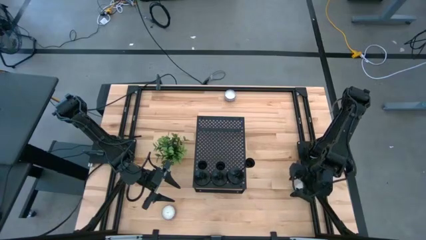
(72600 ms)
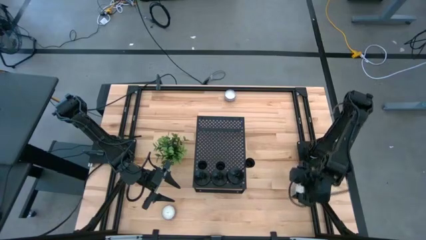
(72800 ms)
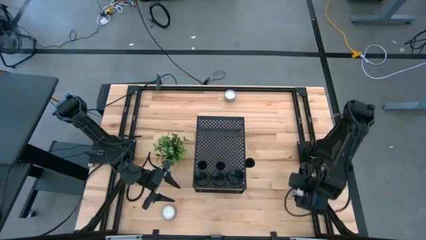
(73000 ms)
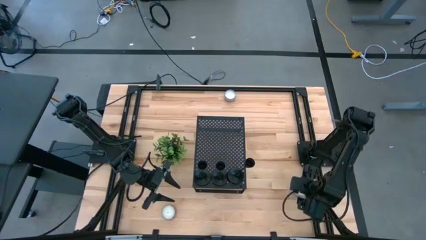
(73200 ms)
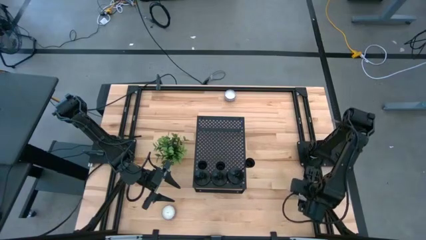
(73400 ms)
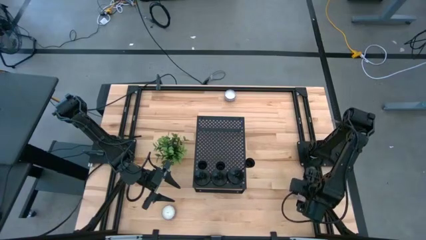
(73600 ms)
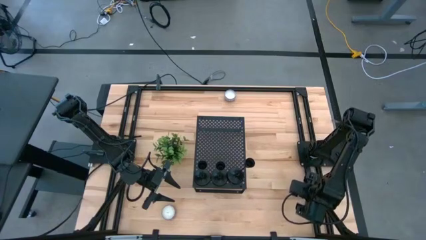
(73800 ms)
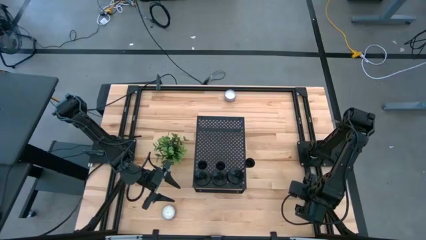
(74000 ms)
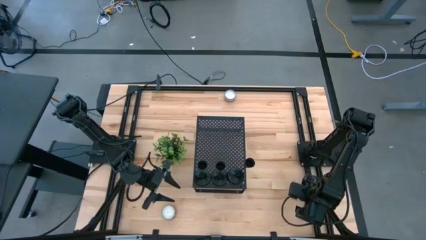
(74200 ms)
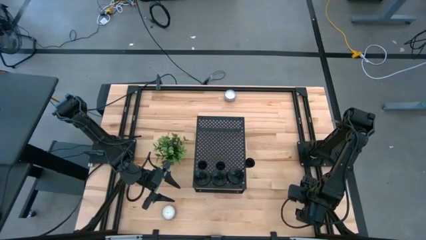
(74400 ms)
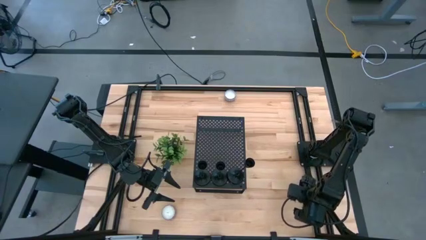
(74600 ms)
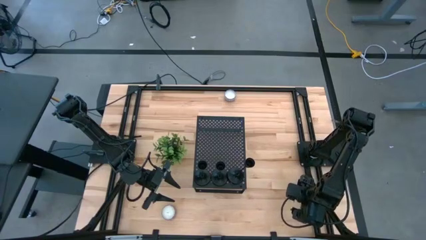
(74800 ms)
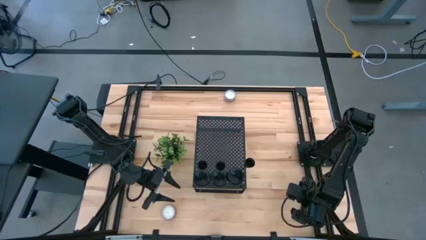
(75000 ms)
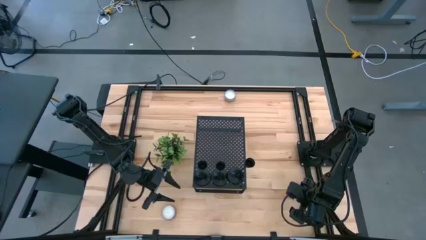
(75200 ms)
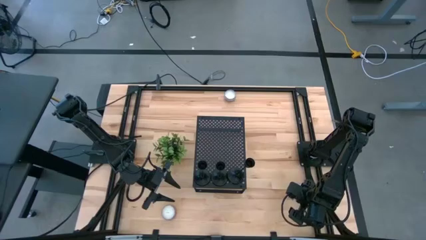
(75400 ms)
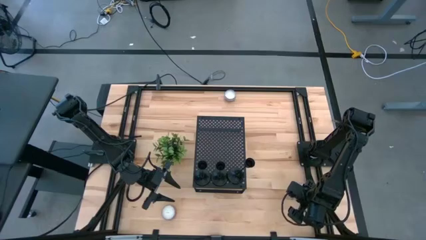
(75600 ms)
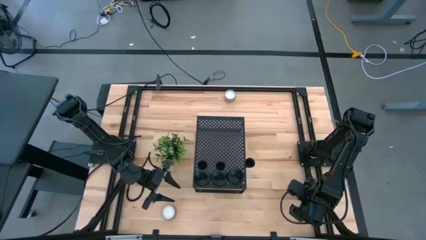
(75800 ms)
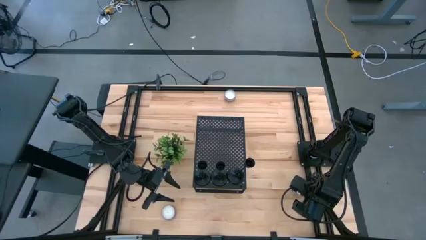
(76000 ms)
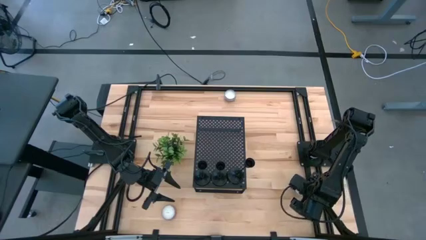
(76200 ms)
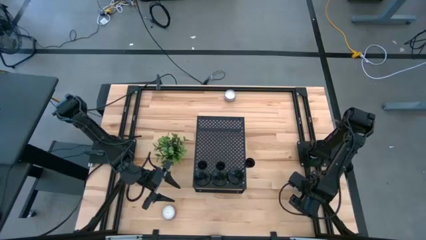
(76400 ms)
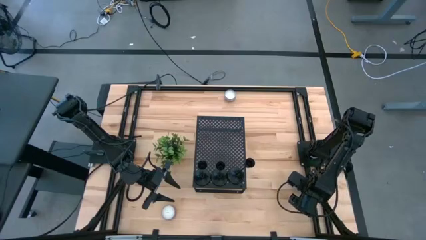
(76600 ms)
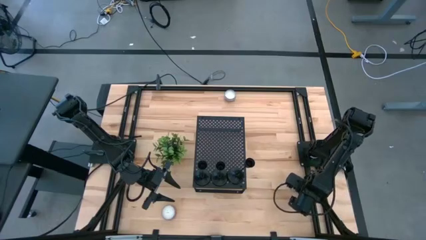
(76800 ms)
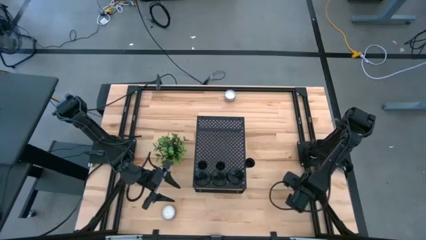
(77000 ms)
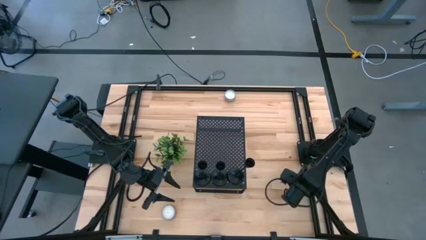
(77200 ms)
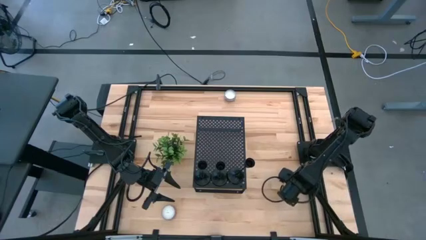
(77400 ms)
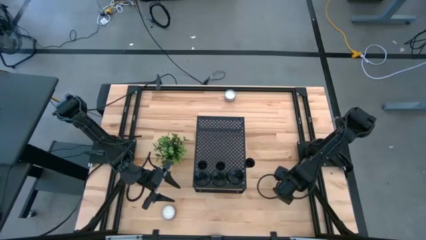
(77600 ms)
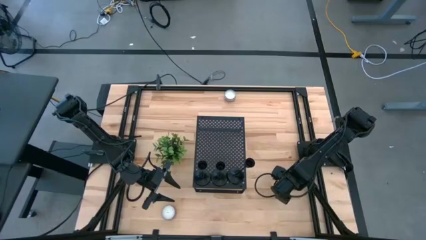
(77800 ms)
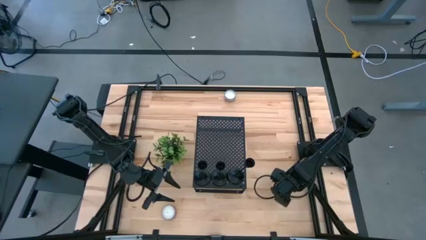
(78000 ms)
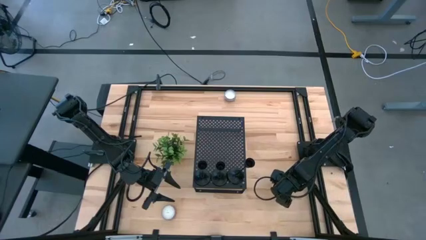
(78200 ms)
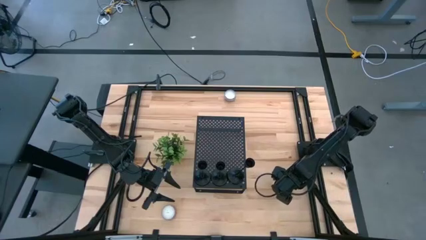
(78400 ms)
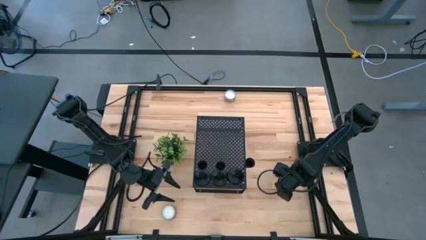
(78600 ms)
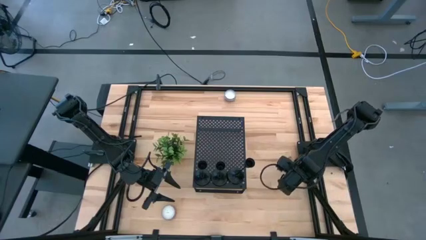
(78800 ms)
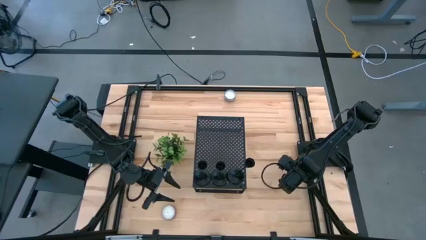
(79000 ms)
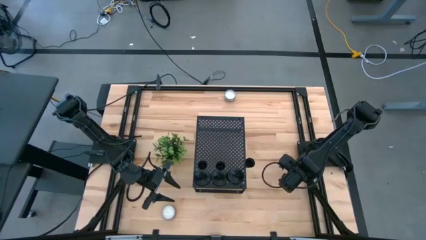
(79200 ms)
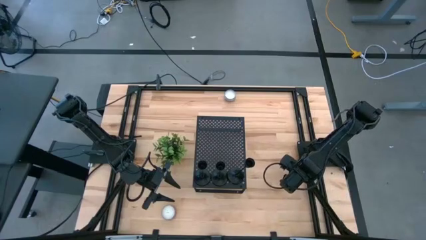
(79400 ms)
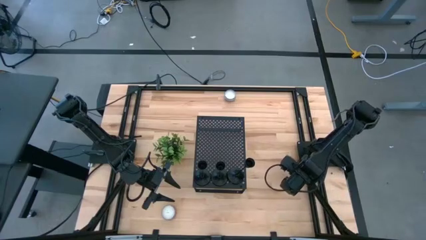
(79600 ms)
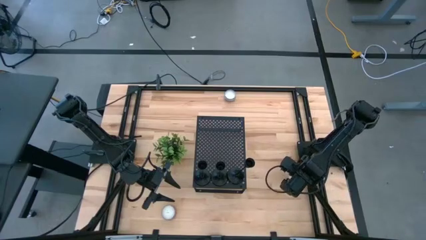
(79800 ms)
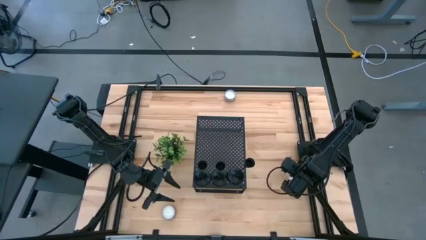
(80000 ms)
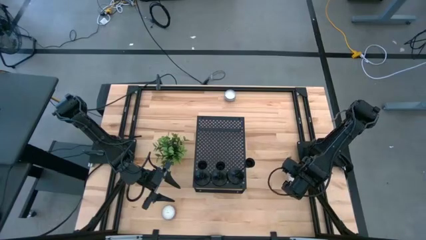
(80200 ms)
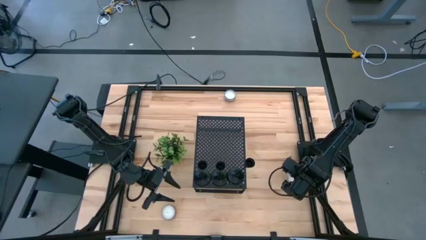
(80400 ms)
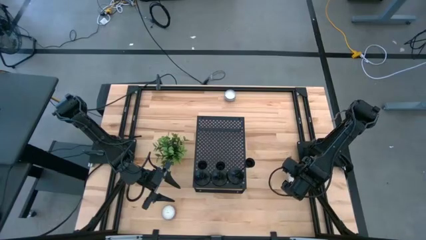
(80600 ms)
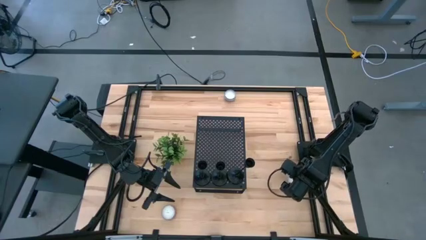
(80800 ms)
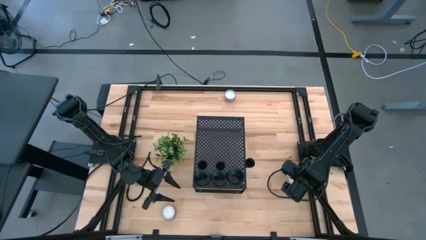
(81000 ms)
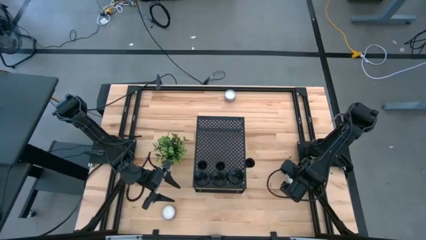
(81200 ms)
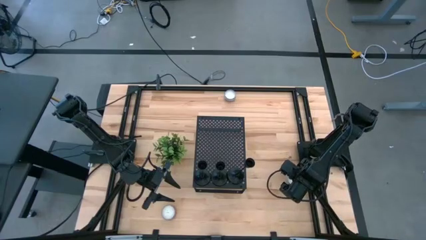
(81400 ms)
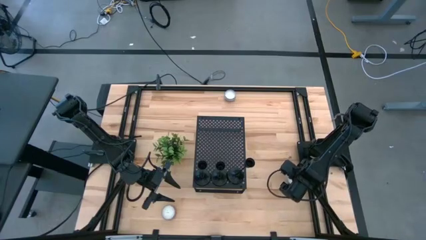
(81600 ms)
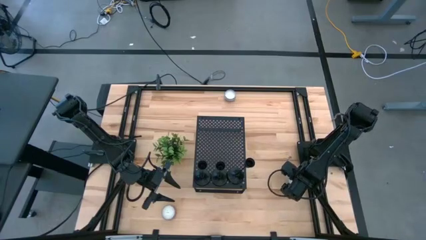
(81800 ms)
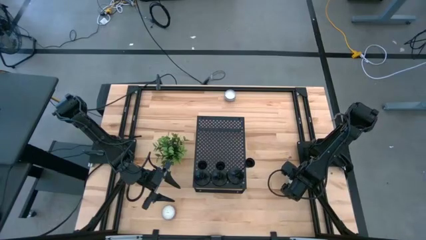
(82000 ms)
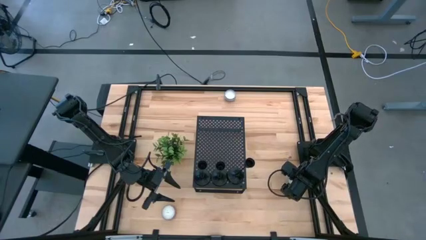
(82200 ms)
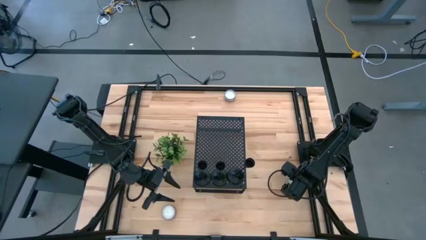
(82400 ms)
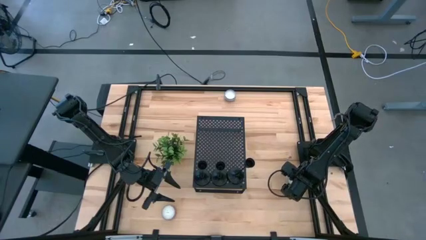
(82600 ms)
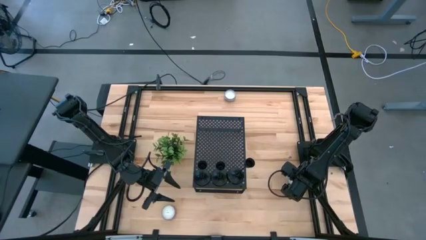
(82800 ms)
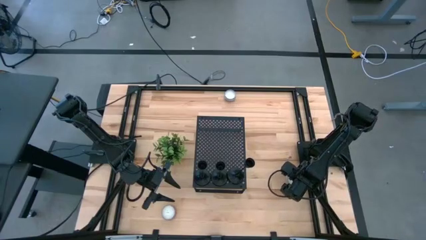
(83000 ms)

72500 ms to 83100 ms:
Task: Pick & Place candle stick holders
Put the blue patterned candle on the shelf

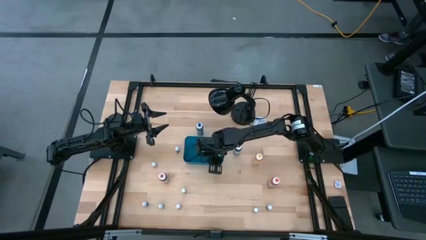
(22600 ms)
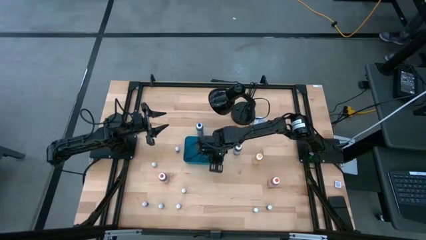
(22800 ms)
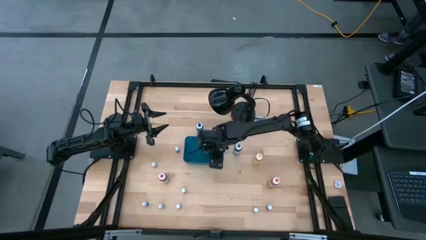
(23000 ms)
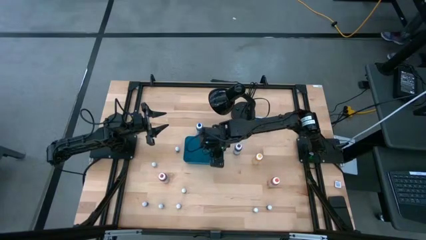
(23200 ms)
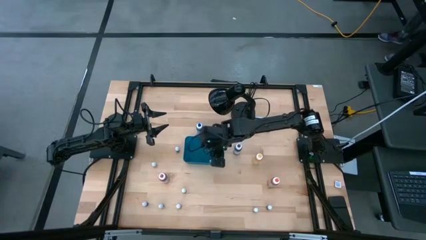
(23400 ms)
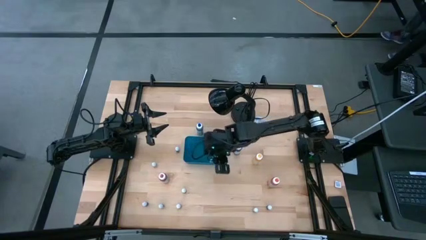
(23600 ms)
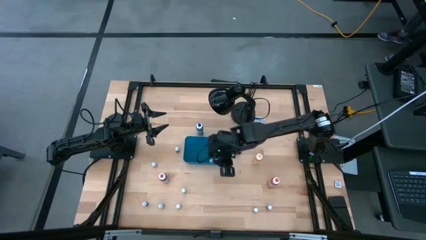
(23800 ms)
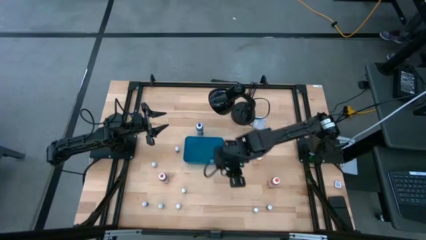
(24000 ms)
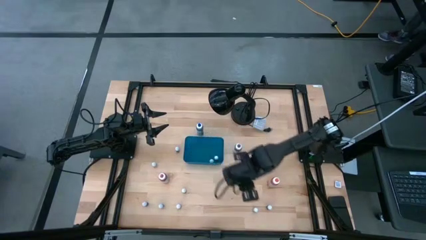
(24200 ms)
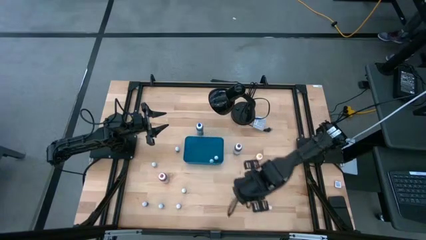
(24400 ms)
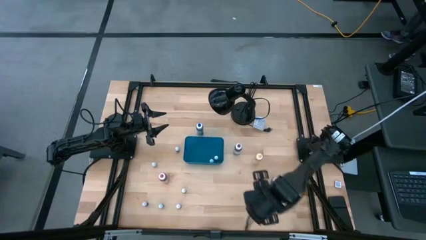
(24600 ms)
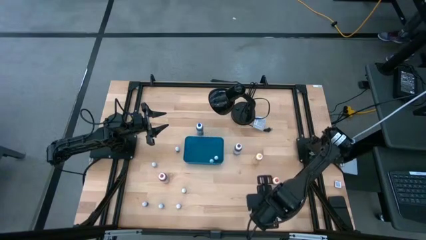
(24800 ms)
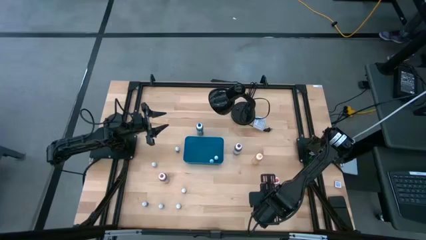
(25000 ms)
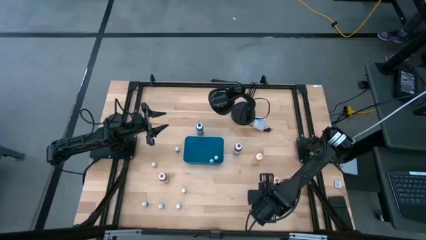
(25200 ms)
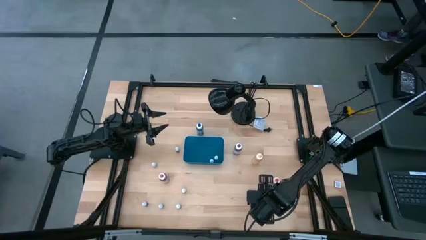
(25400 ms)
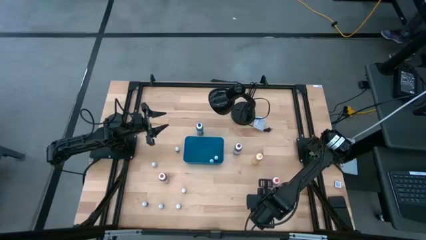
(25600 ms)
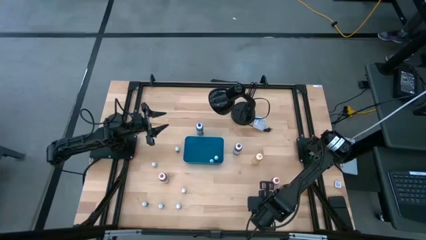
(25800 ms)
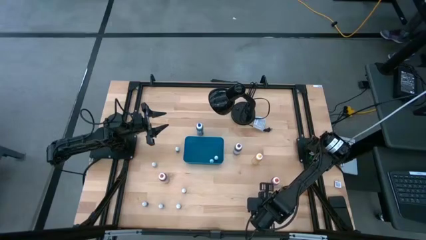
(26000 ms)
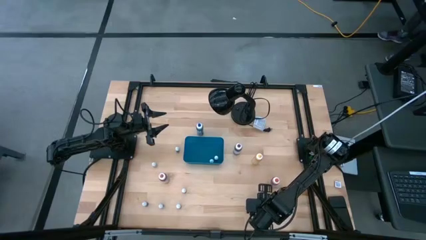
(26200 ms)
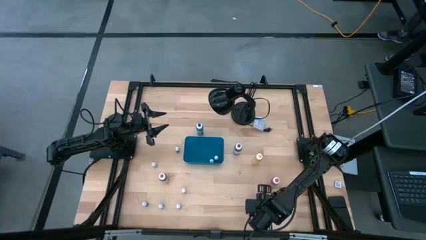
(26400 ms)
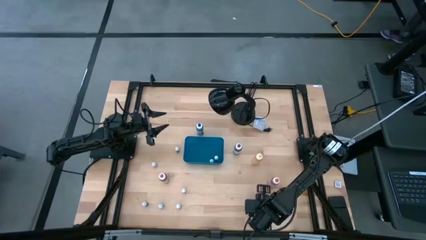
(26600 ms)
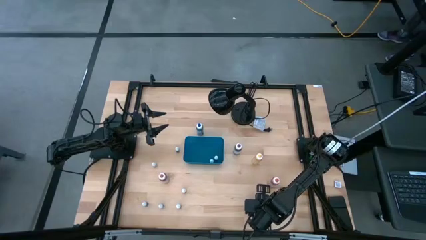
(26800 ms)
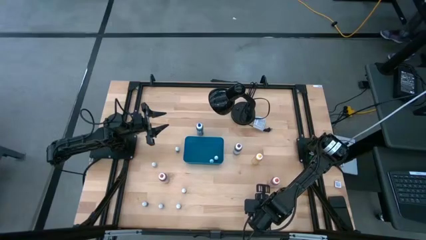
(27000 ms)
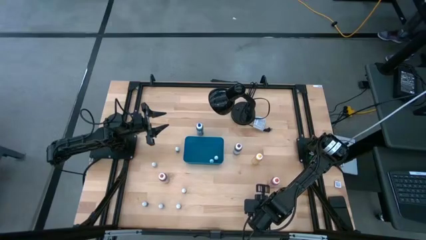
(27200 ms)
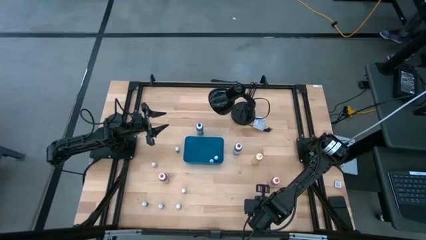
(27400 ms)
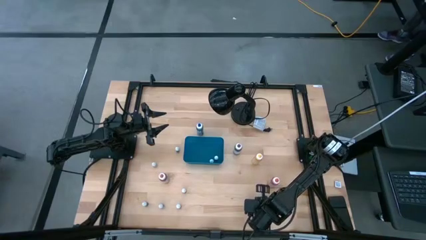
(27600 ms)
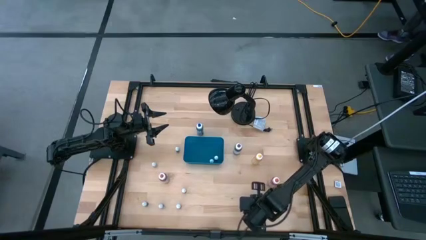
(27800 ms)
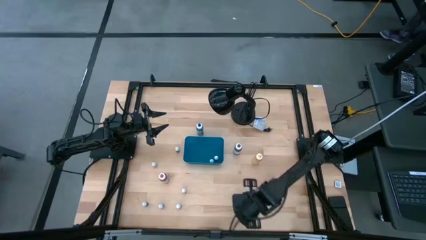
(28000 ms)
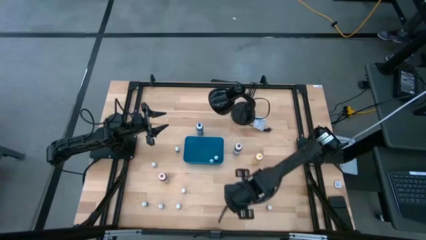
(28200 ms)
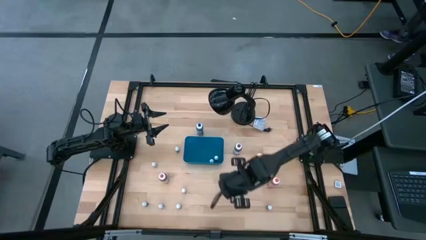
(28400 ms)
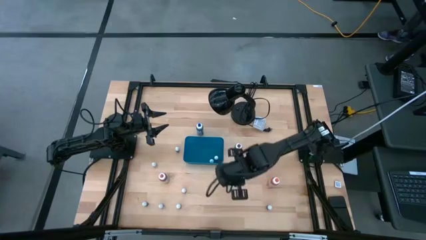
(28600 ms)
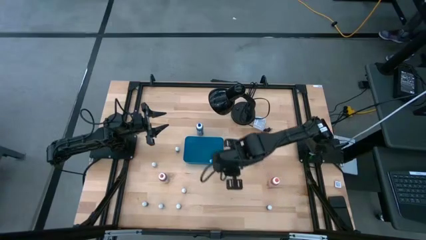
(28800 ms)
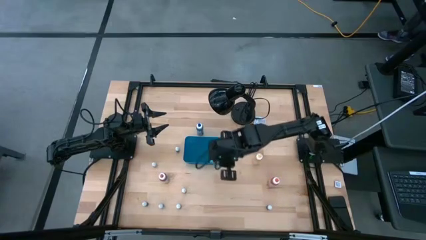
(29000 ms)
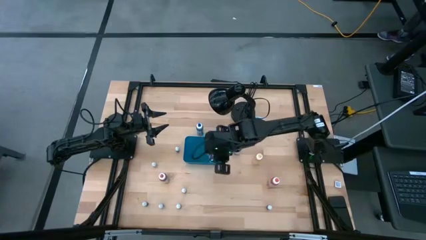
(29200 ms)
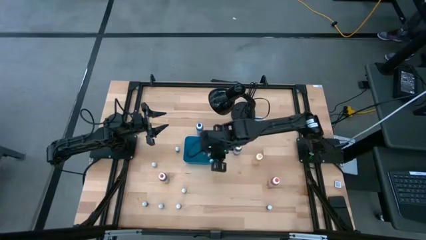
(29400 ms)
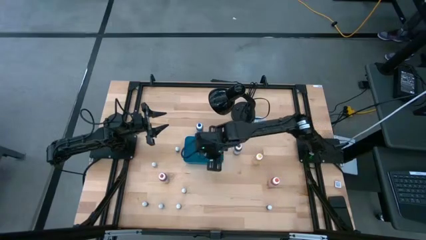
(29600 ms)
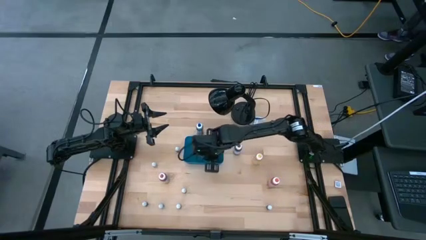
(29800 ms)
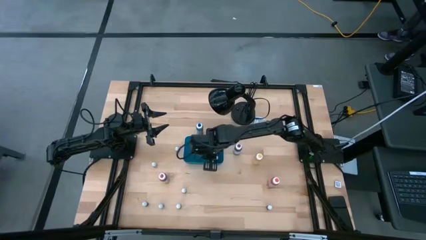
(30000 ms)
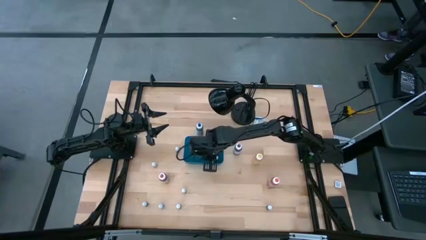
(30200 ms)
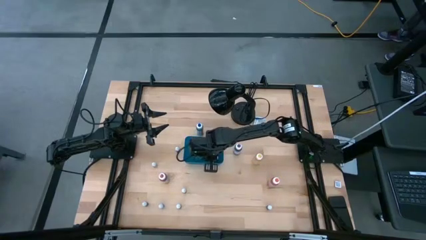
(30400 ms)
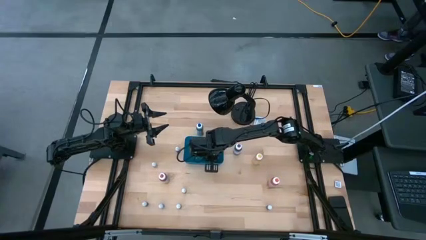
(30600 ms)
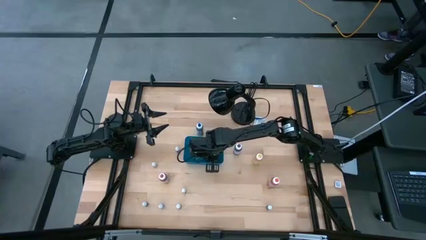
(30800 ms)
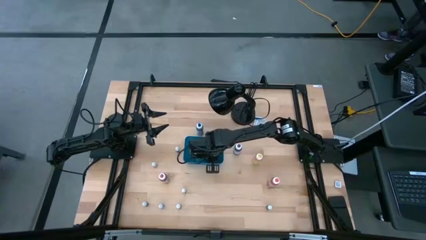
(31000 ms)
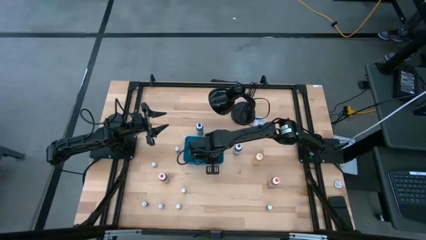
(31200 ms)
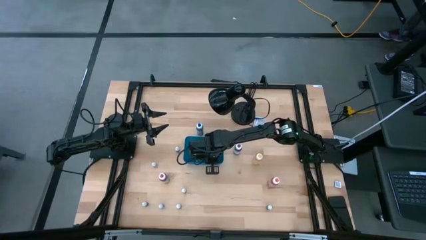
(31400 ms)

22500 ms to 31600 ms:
Task: Pick & Place food coloring
Put the small dark blue food coloring bottle into the blue bin
